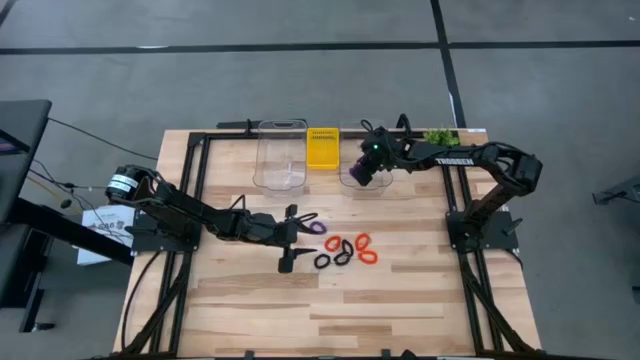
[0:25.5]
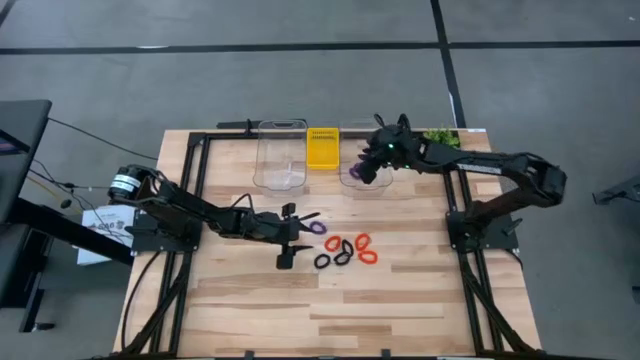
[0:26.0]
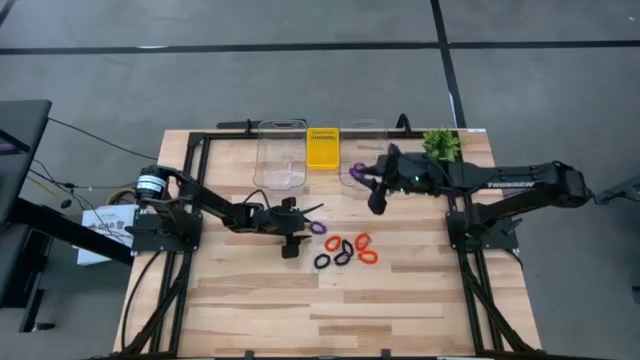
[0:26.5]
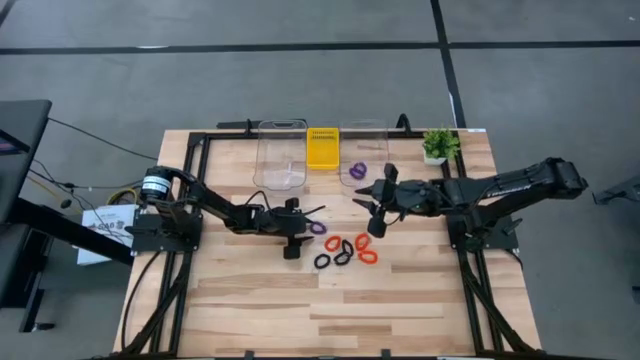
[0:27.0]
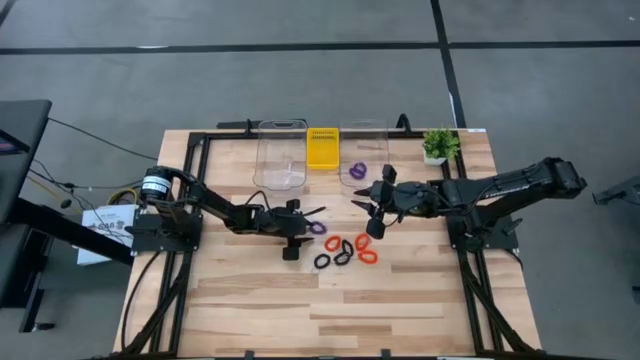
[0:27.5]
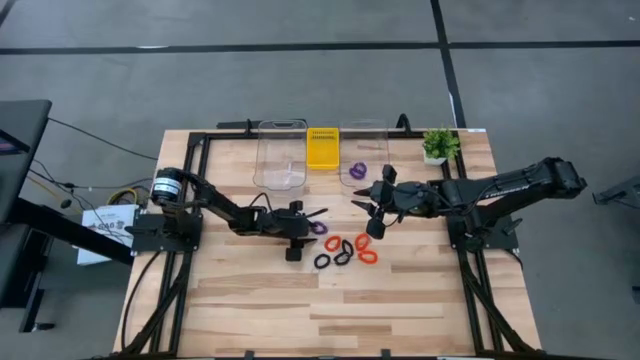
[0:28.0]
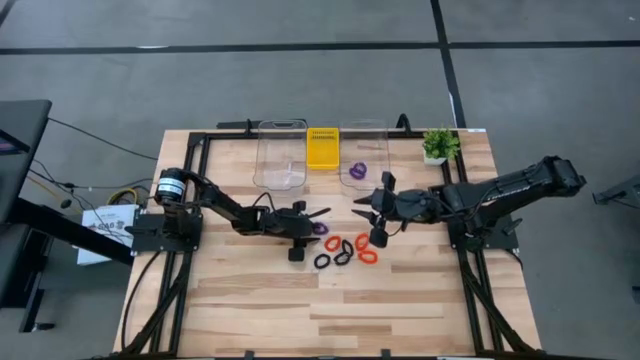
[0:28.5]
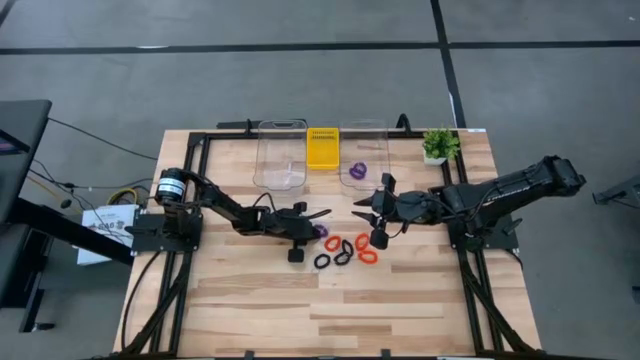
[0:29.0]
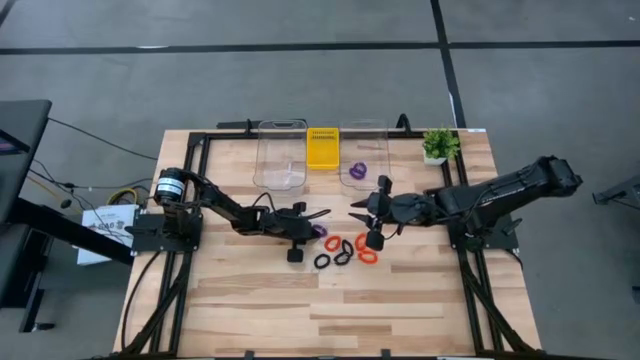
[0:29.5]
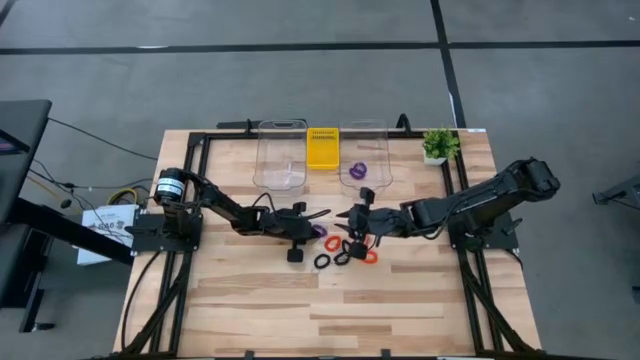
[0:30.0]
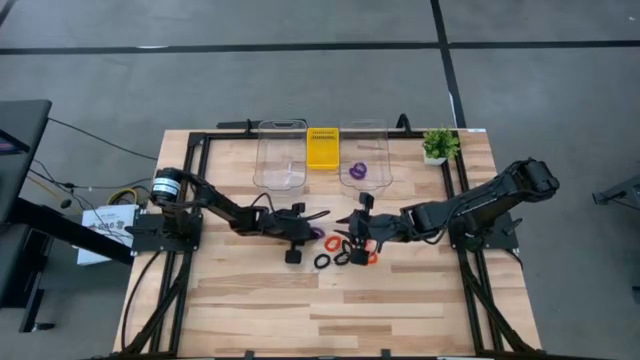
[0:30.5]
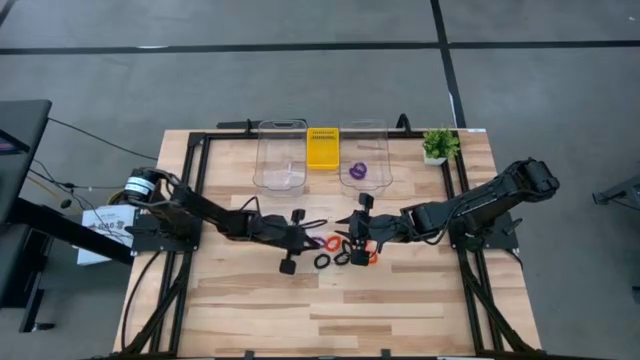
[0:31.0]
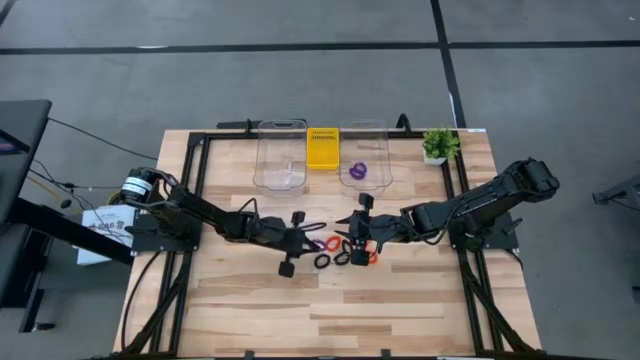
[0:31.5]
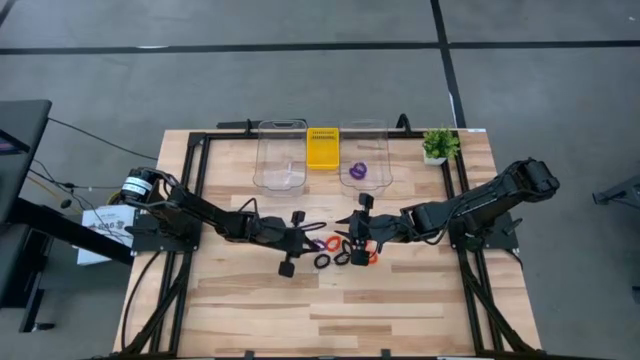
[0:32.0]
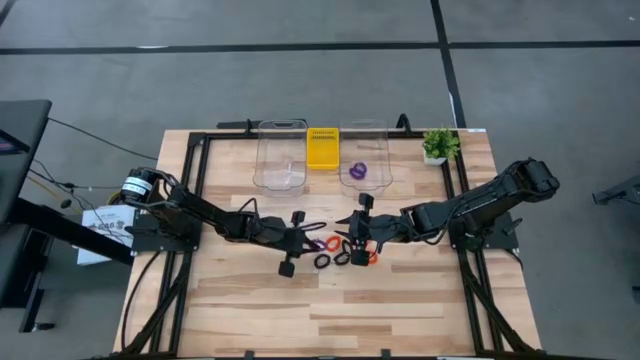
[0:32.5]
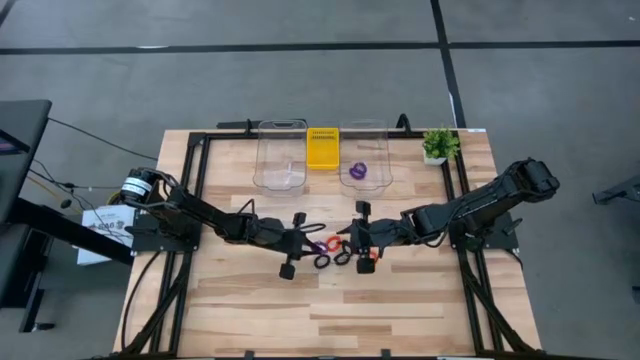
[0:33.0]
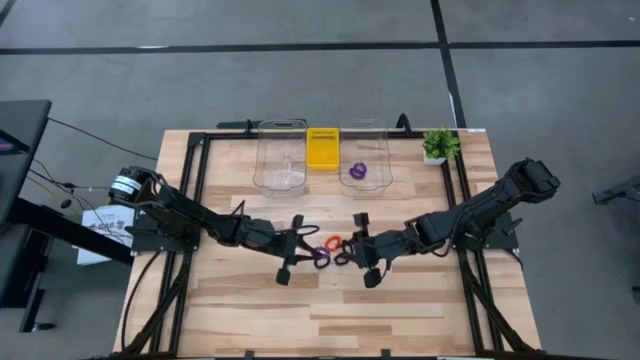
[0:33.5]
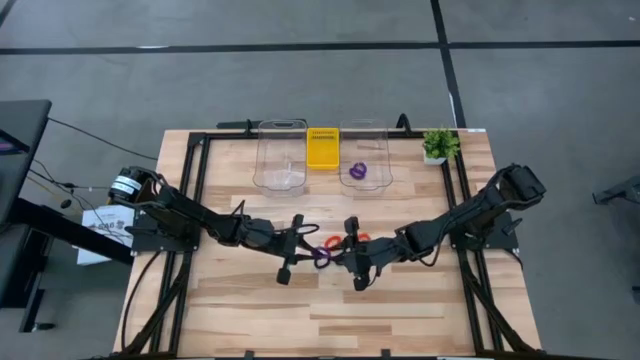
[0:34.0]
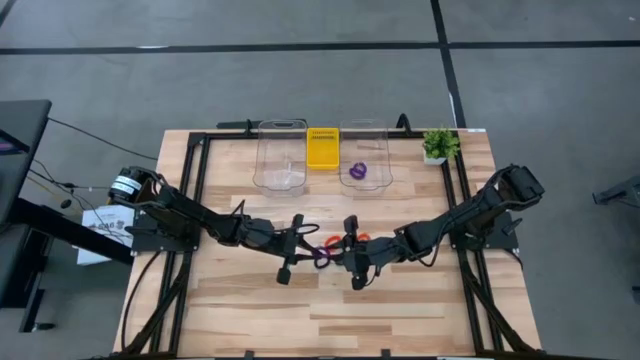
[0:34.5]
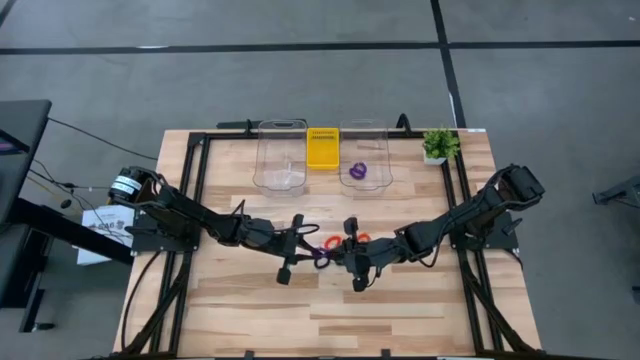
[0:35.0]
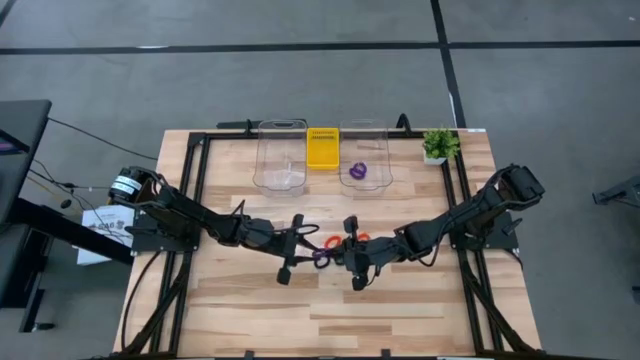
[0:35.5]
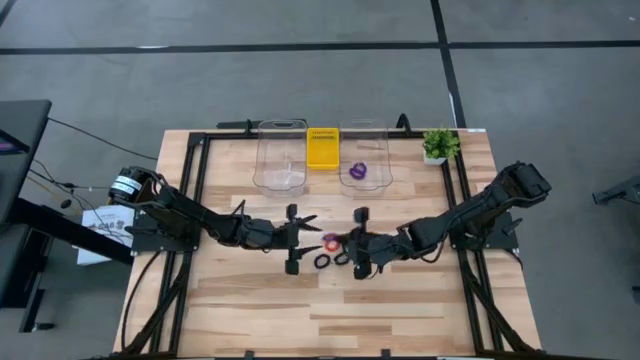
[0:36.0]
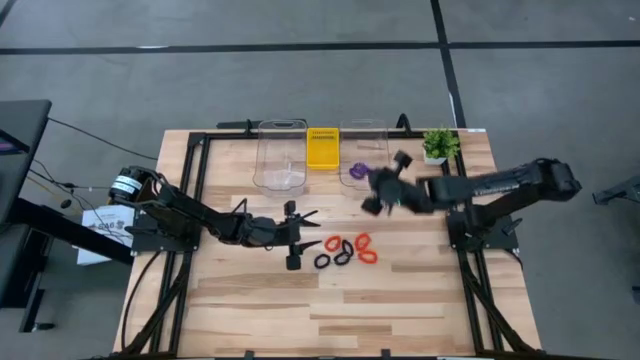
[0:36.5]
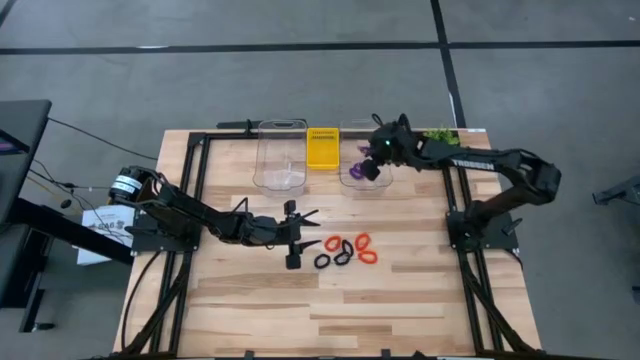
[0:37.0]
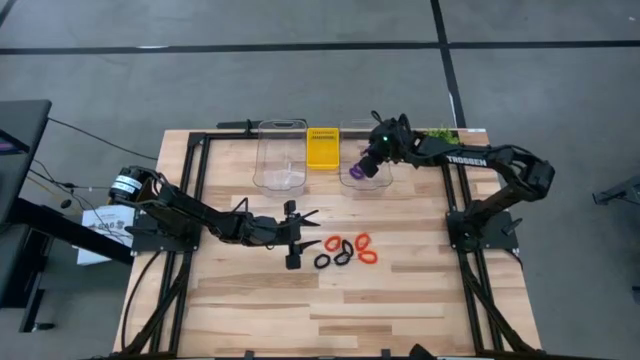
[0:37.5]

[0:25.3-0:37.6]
Task: Sort spring keychains
Put the violet spring keychain into the right transparent bin

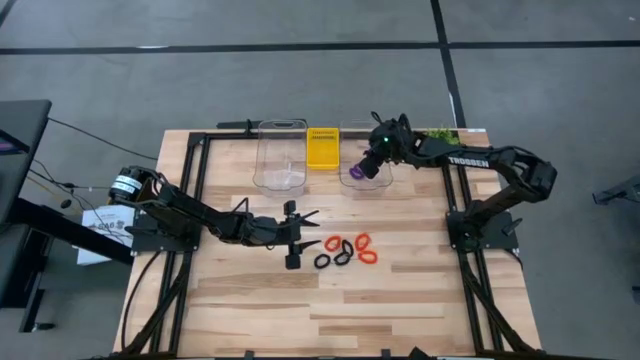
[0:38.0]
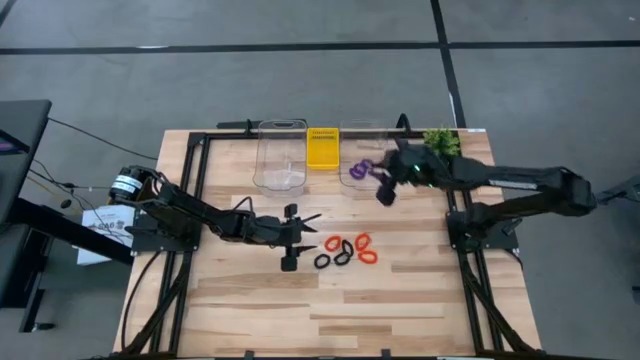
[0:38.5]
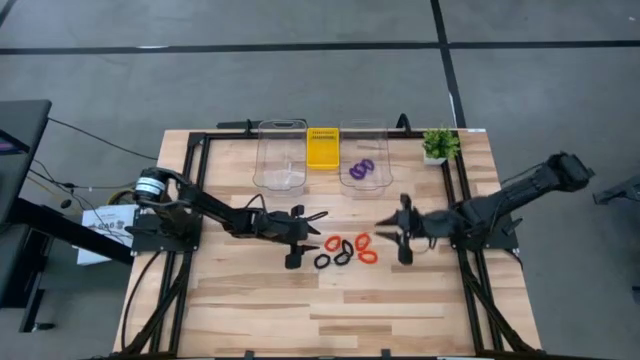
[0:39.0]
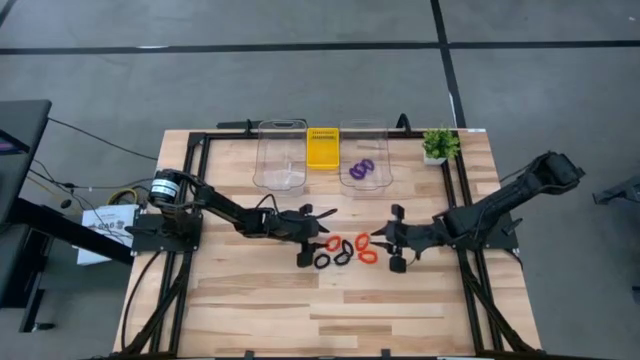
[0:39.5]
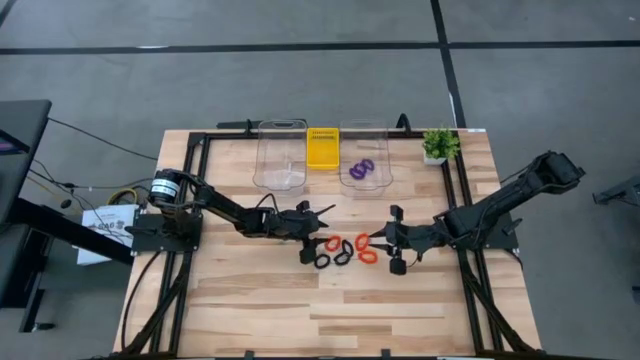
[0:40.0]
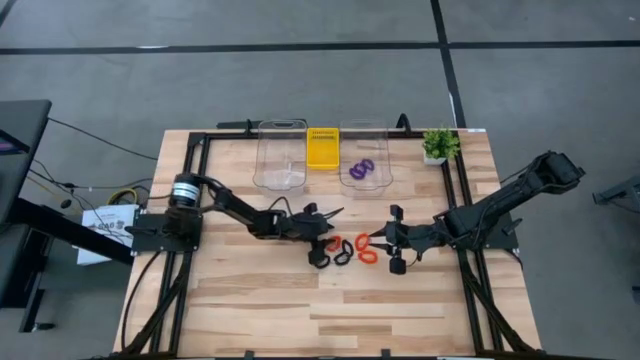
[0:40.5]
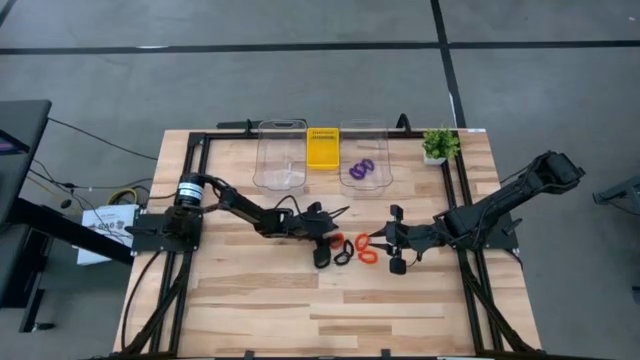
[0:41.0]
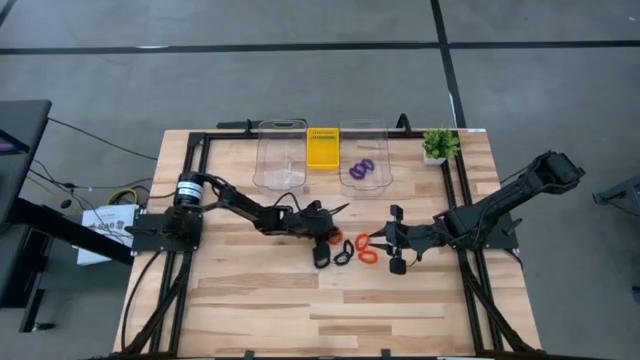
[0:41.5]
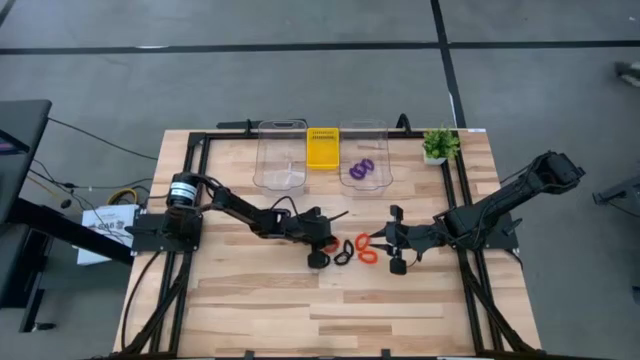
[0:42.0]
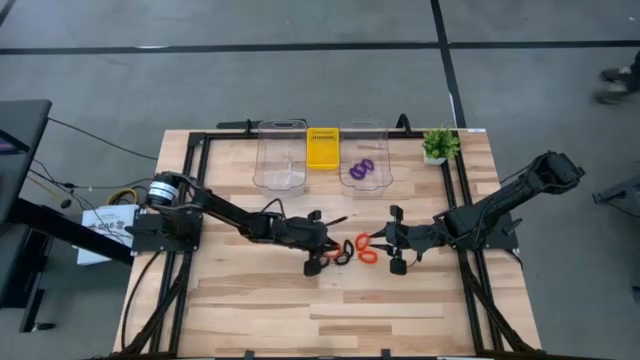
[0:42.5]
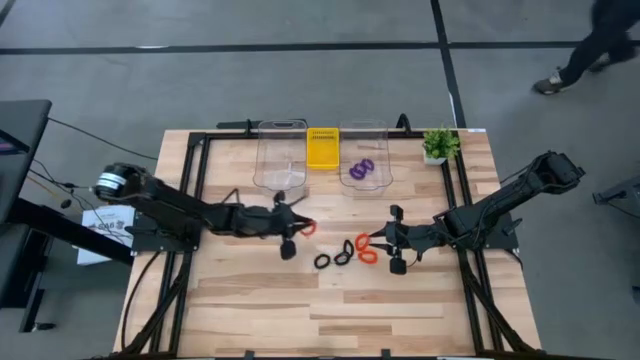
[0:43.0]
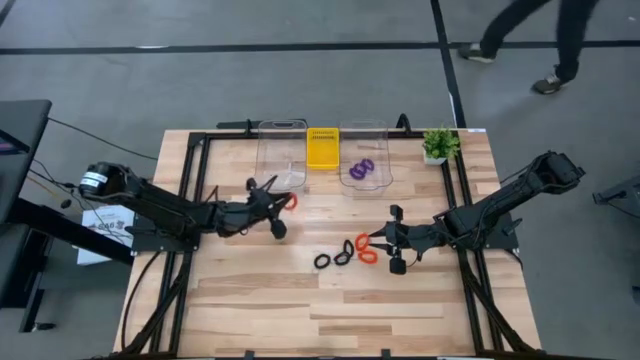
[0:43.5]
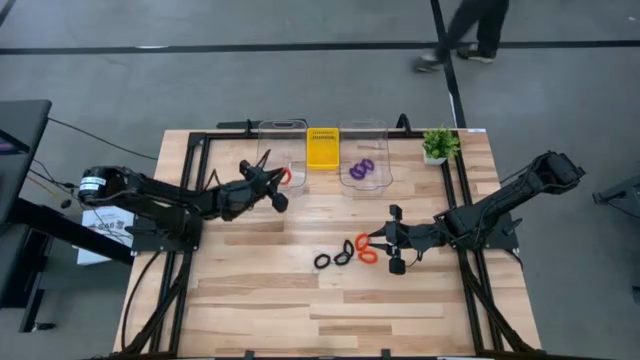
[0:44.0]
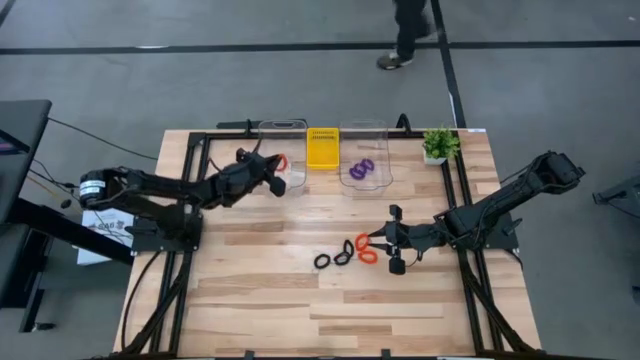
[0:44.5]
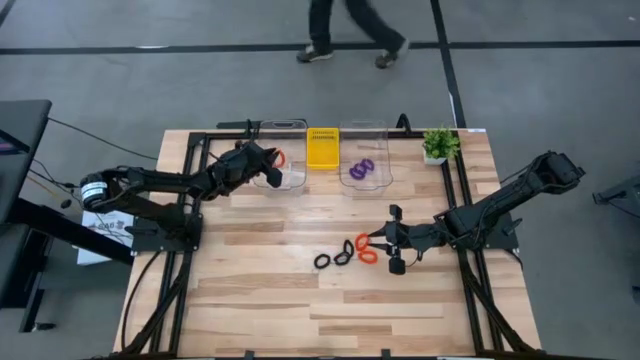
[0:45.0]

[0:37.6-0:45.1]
Put the top left orange spring keychain into the left transparent bin

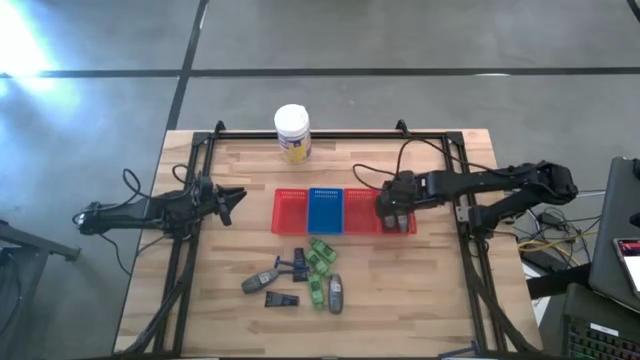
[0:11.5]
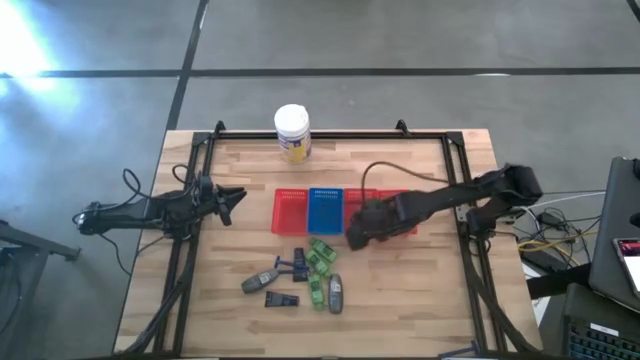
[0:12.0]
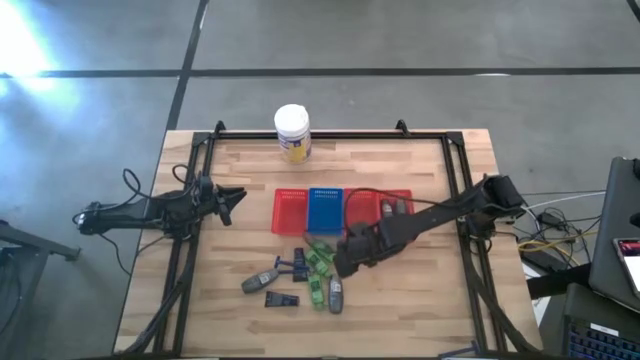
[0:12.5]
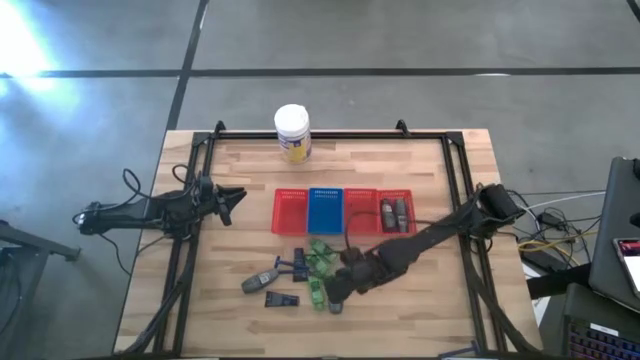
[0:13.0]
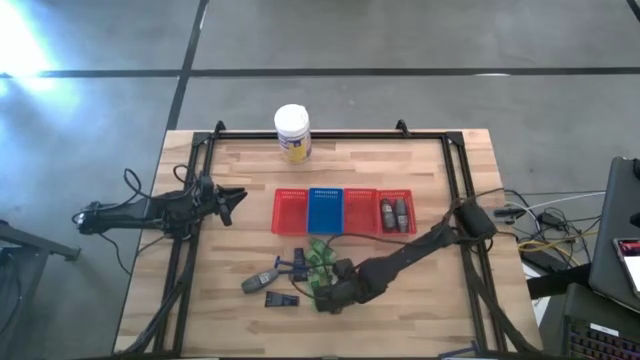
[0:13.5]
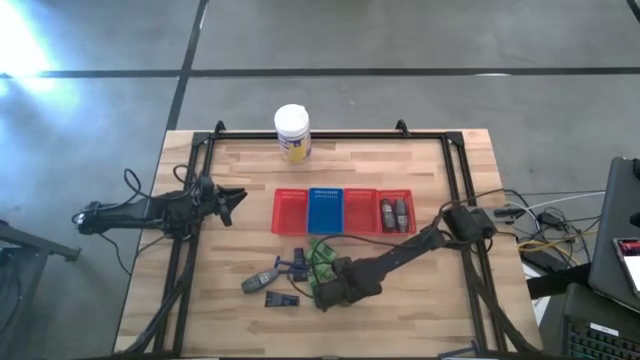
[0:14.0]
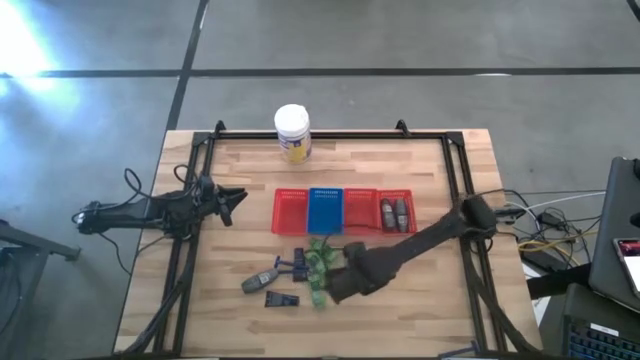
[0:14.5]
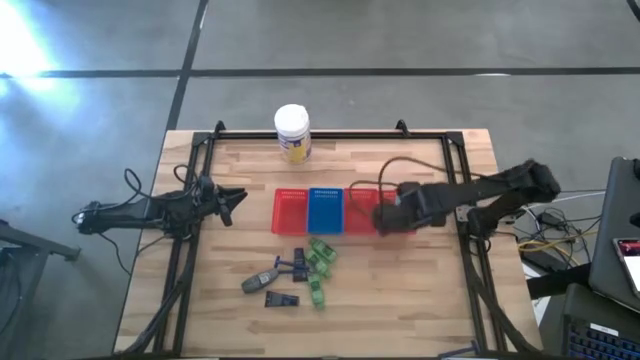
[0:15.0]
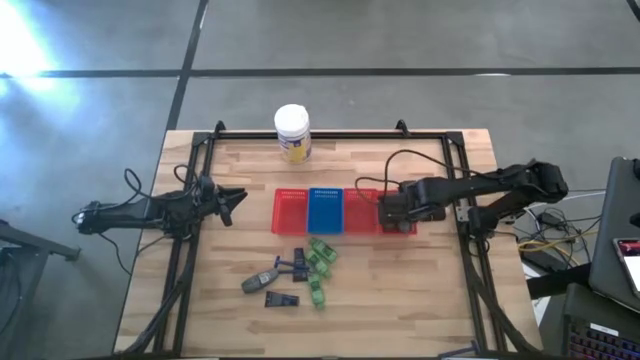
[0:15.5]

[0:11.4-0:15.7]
Task: Pick & Place Travel size toiletries
Put the deodorant into the right red bin
